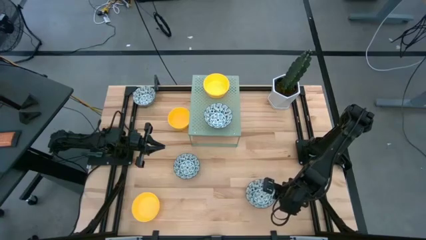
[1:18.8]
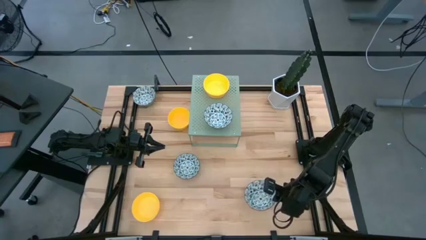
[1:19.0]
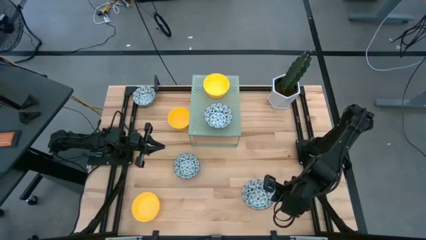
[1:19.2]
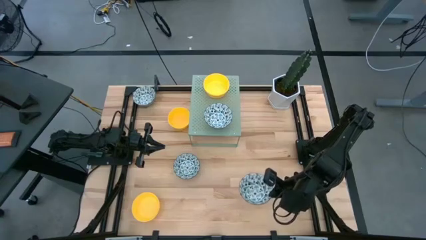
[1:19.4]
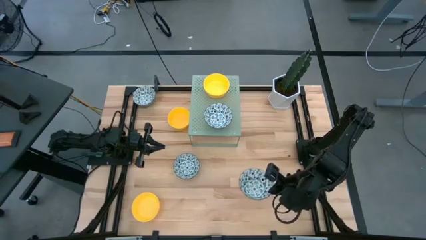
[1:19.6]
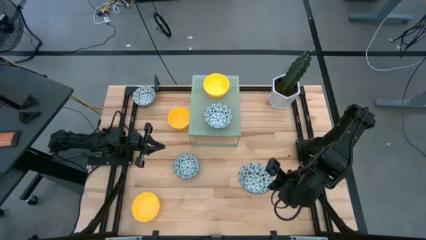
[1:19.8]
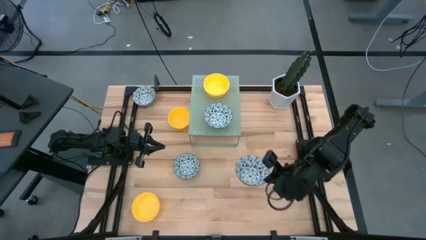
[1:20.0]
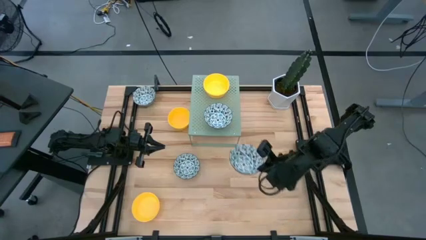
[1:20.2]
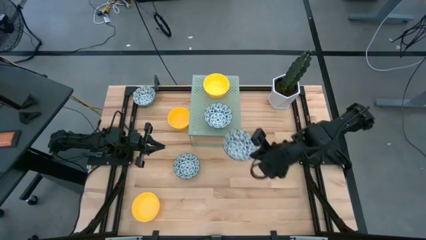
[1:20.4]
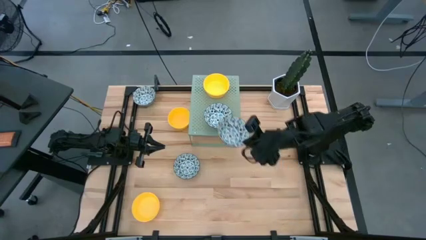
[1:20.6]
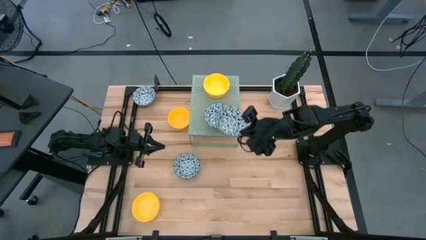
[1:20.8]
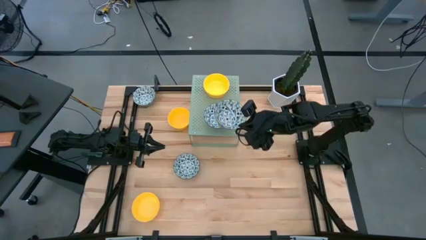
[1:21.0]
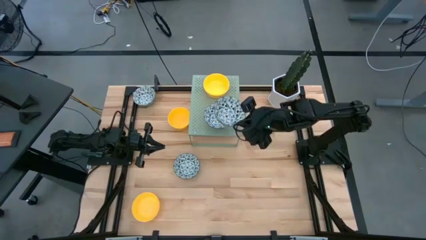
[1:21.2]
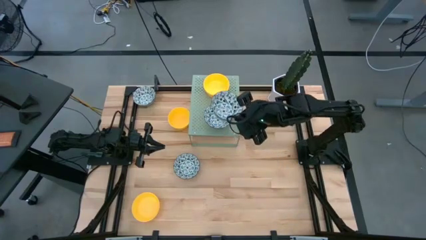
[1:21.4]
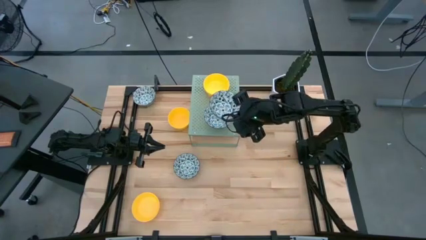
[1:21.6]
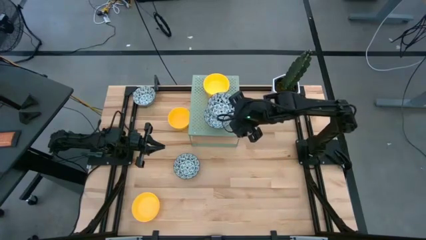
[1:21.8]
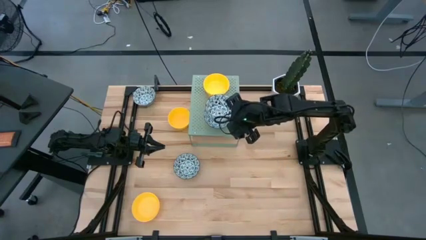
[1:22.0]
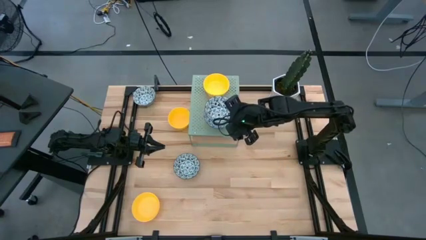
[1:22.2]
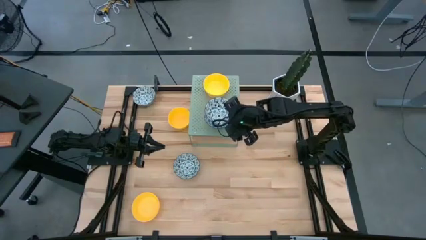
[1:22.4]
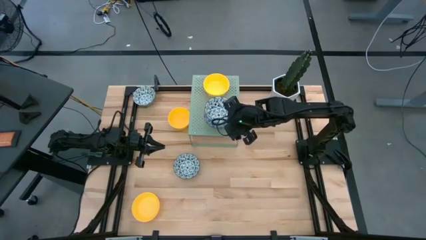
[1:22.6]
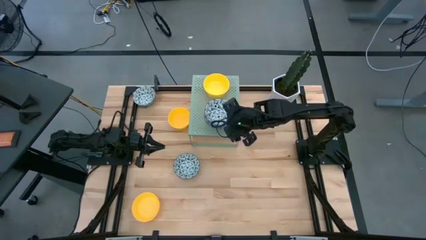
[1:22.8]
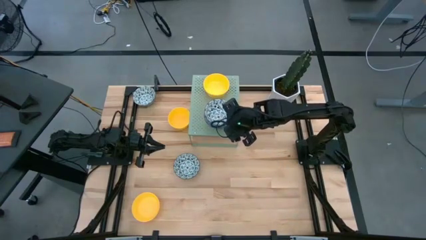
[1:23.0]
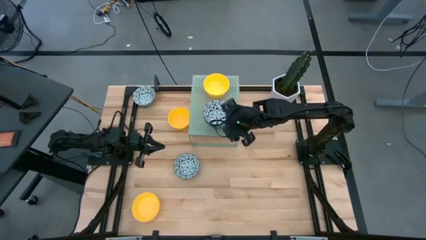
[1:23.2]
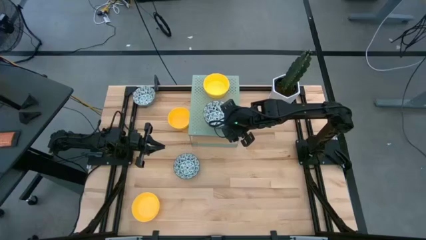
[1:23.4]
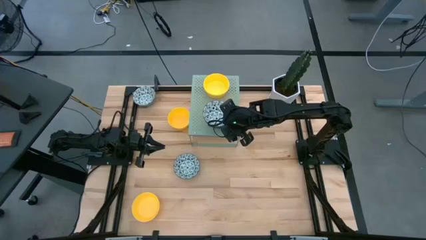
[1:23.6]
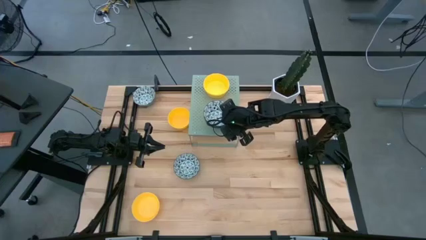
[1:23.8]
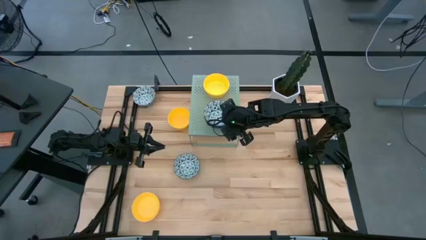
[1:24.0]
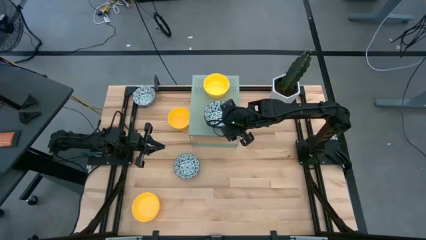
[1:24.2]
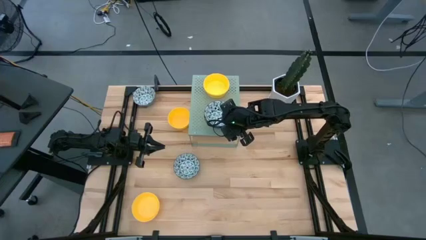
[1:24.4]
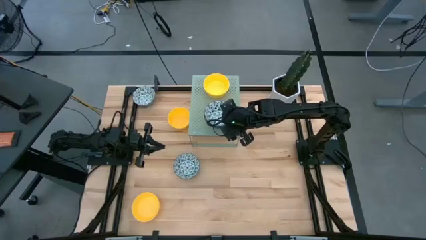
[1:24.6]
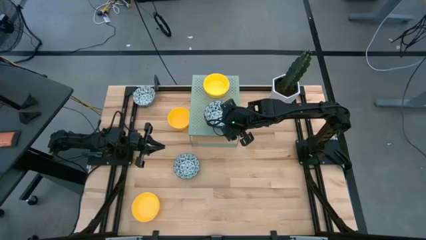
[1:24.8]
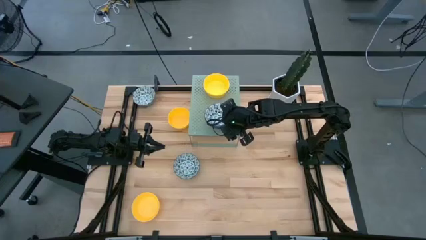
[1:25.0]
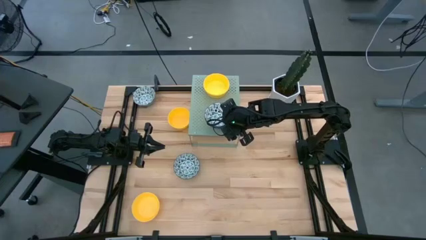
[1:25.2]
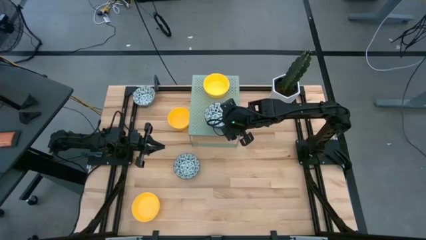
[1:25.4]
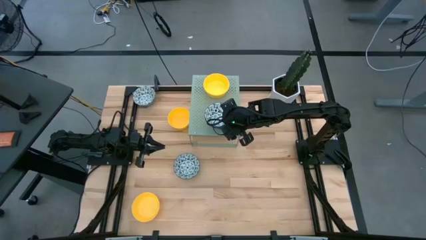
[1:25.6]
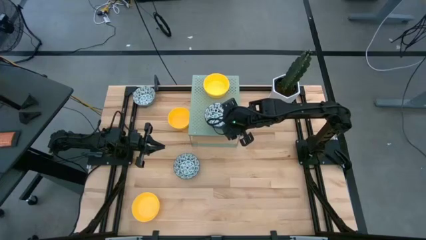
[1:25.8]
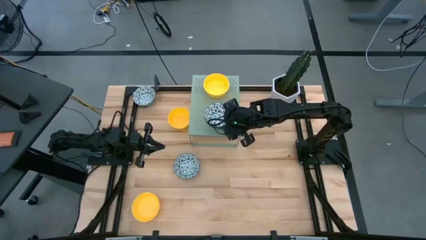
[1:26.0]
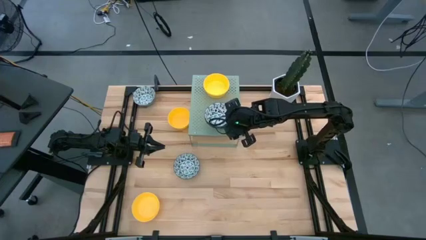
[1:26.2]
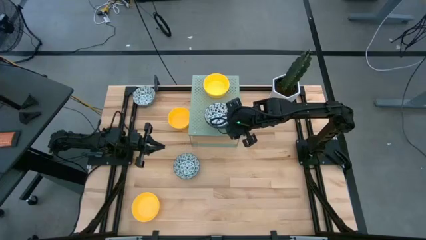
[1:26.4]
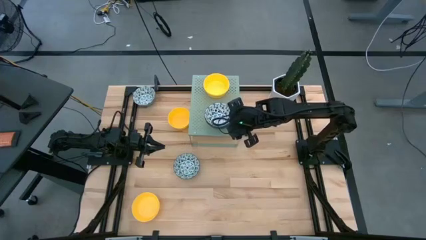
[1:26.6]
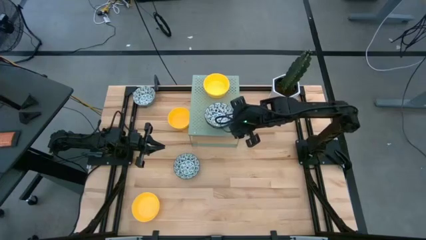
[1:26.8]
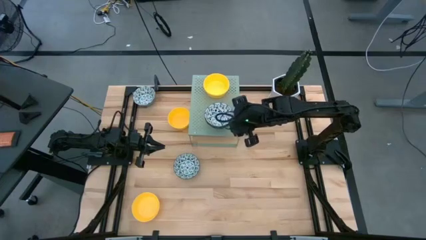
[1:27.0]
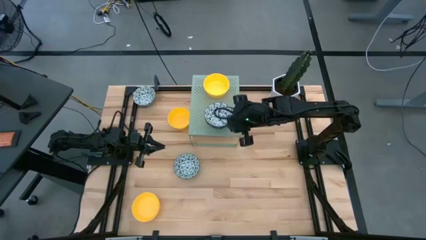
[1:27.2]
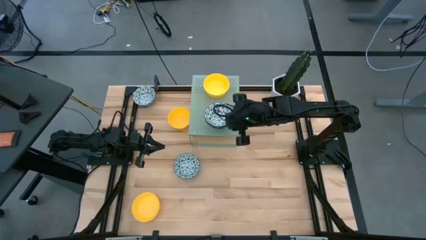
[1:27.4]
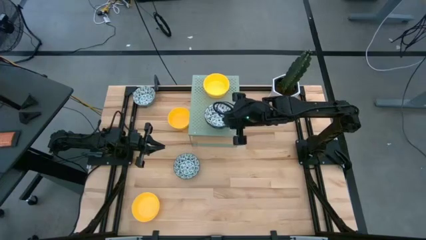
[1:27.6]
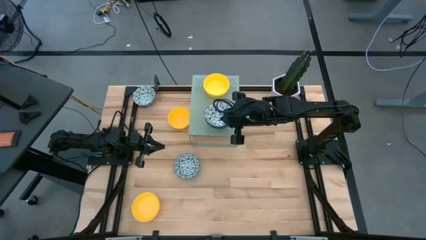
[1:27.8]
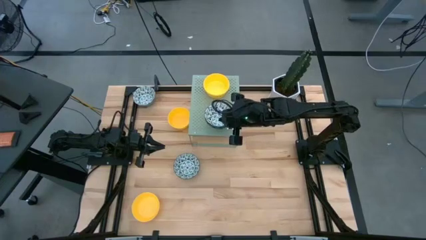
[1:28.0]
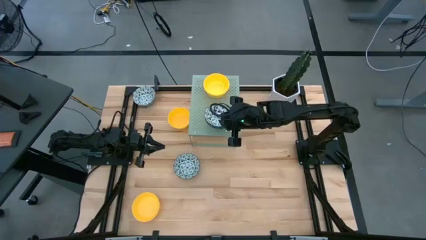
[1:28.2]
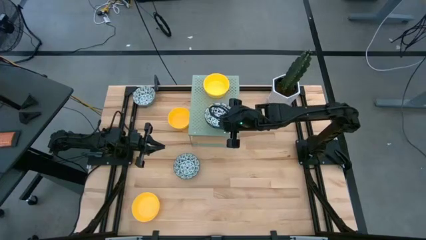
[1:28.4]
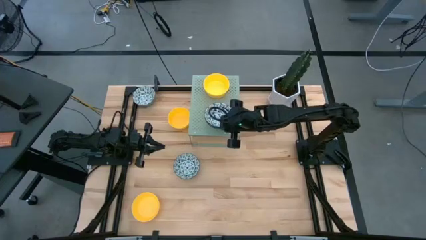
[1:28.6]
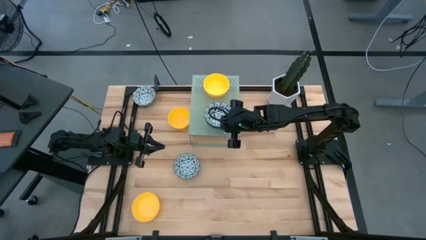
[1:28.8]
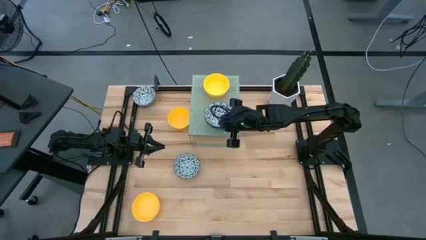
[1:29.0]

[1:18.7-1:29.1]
Task: Pick & Place Mini bowls
Stack the blue and white bowl on top of the other blue and white bowl on the shelf
